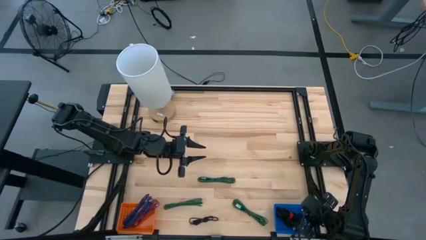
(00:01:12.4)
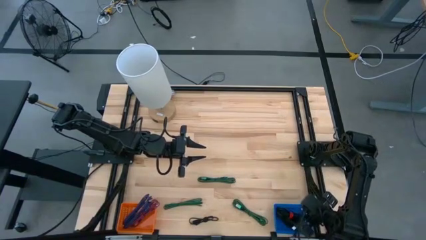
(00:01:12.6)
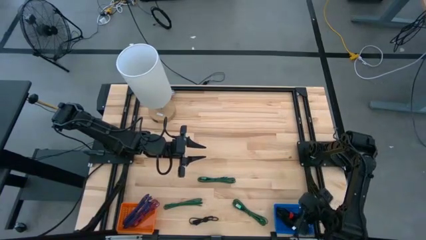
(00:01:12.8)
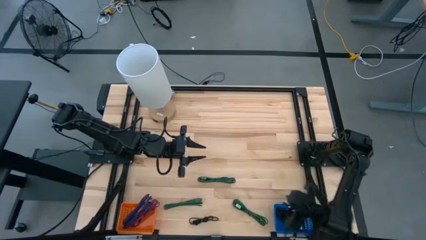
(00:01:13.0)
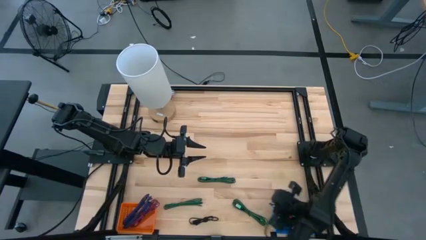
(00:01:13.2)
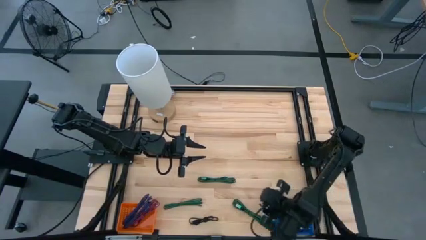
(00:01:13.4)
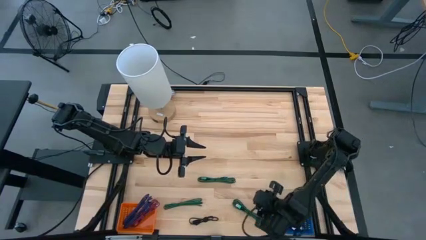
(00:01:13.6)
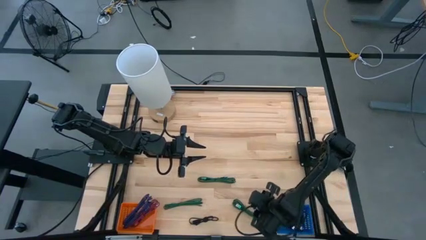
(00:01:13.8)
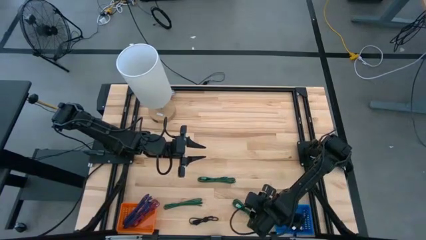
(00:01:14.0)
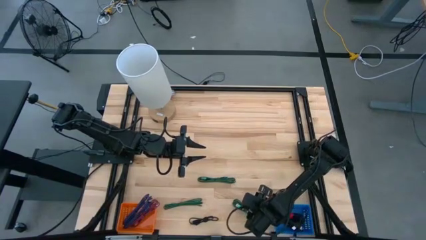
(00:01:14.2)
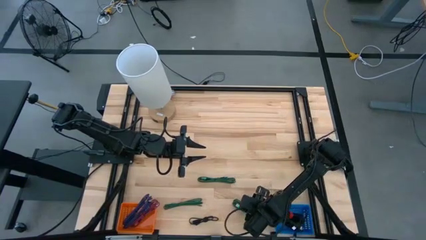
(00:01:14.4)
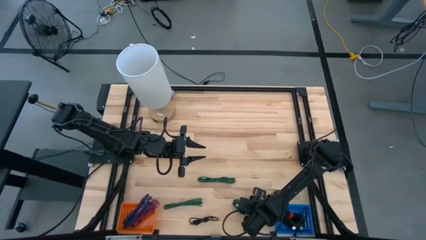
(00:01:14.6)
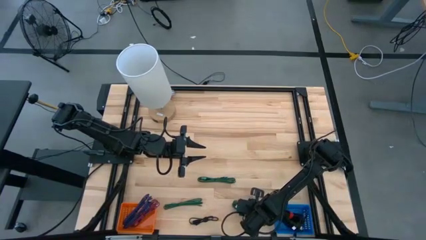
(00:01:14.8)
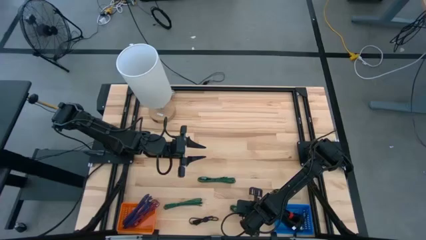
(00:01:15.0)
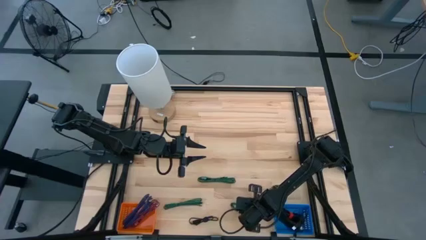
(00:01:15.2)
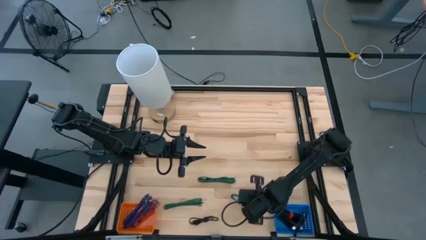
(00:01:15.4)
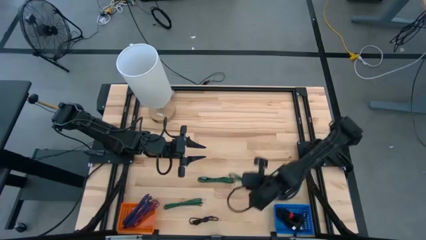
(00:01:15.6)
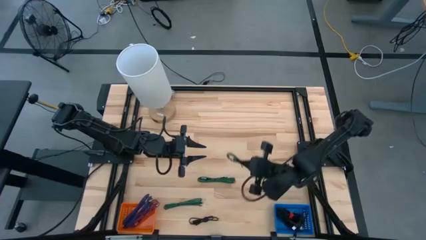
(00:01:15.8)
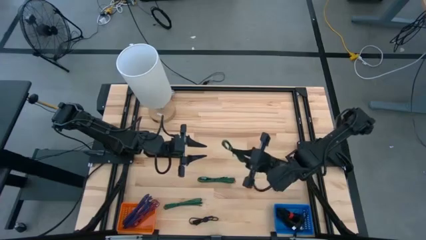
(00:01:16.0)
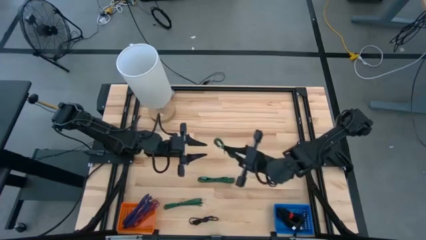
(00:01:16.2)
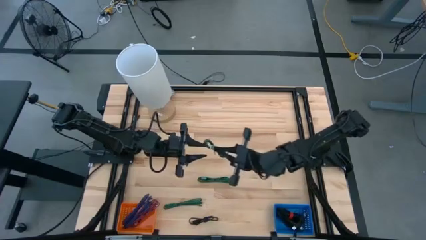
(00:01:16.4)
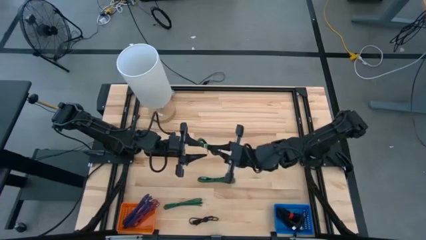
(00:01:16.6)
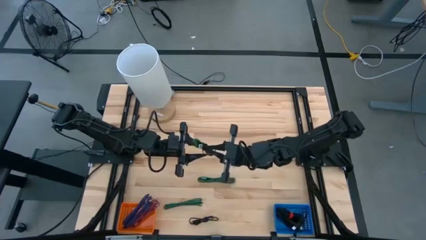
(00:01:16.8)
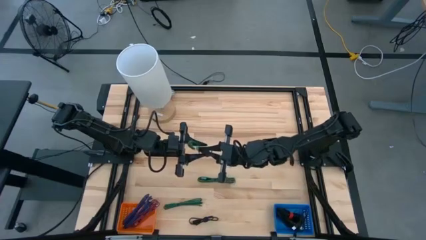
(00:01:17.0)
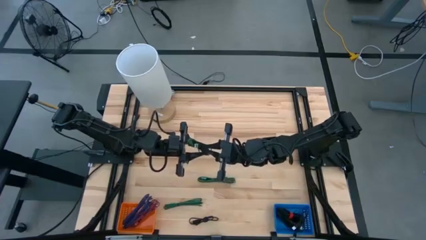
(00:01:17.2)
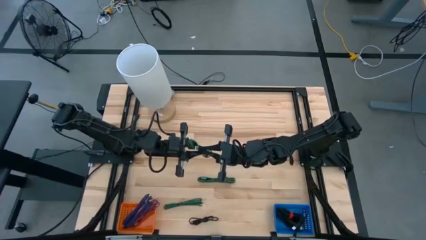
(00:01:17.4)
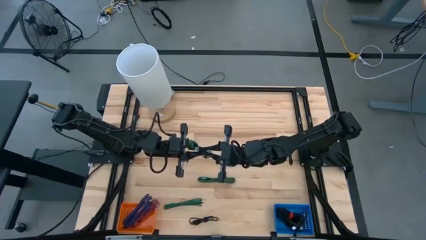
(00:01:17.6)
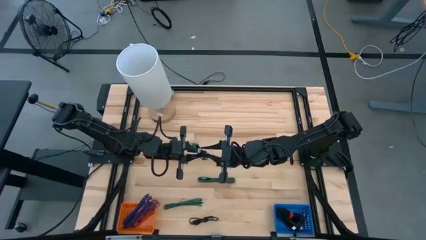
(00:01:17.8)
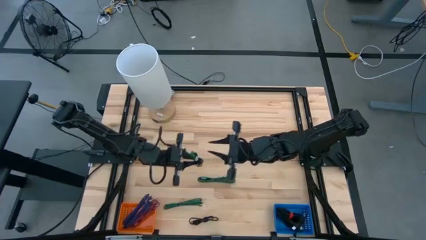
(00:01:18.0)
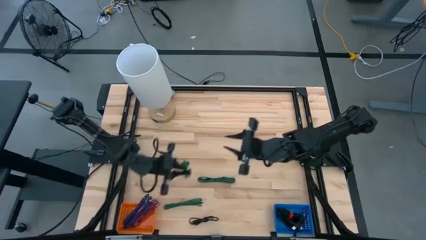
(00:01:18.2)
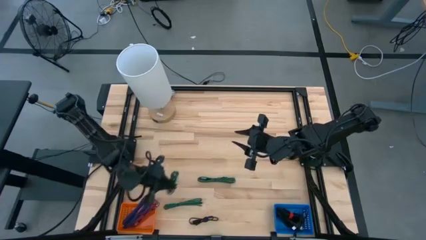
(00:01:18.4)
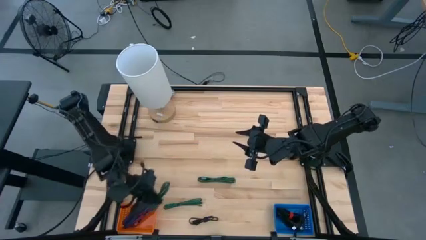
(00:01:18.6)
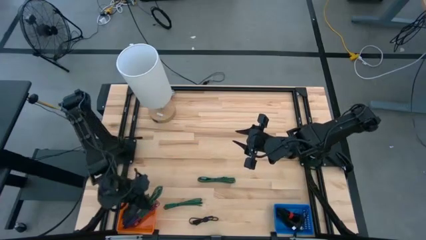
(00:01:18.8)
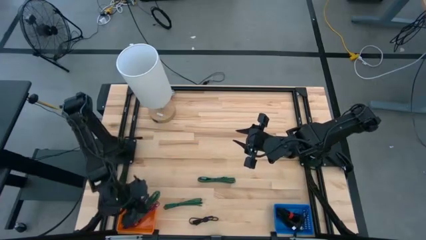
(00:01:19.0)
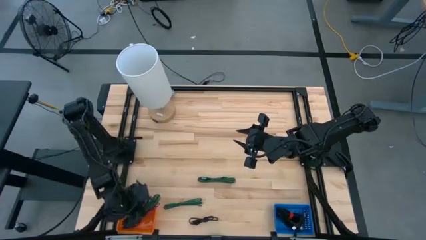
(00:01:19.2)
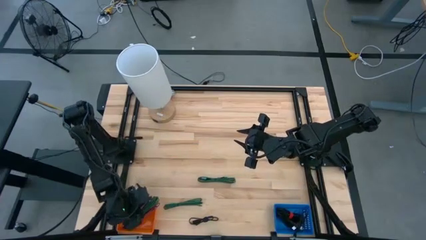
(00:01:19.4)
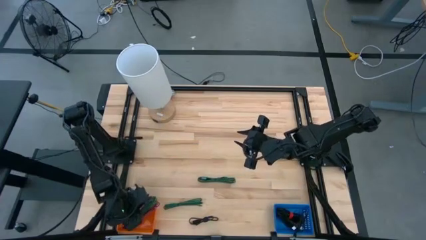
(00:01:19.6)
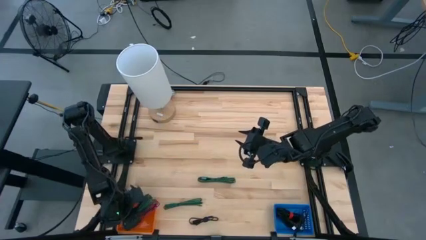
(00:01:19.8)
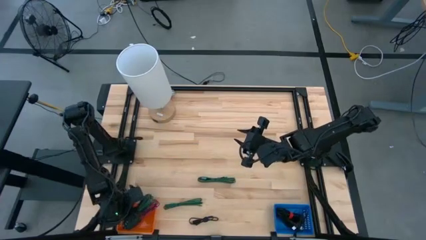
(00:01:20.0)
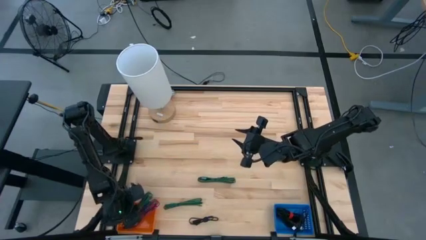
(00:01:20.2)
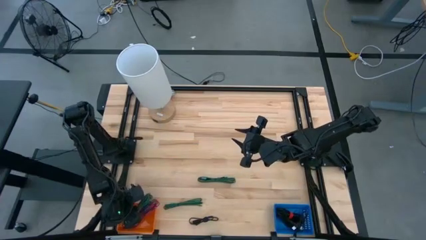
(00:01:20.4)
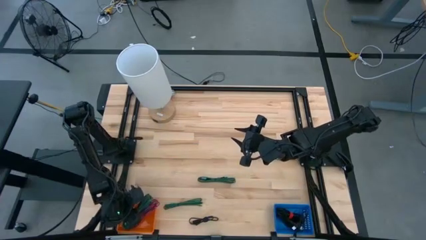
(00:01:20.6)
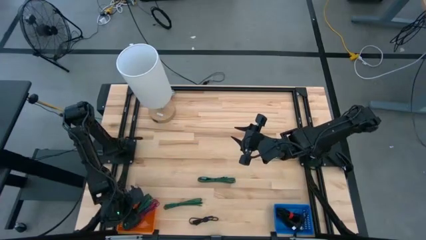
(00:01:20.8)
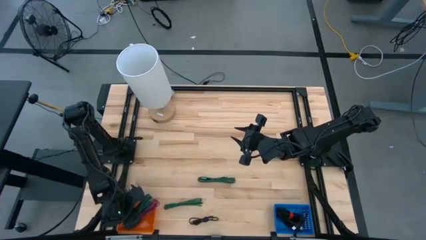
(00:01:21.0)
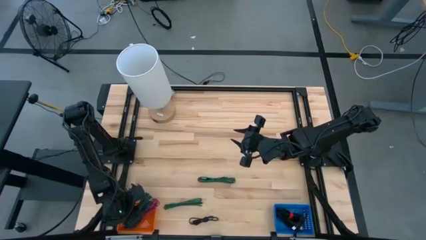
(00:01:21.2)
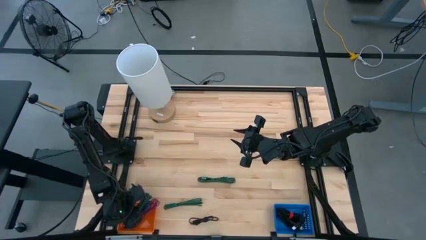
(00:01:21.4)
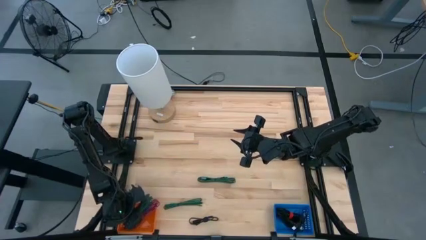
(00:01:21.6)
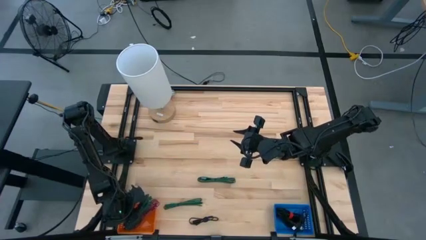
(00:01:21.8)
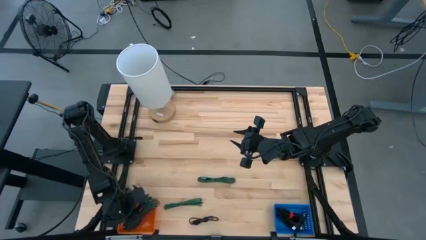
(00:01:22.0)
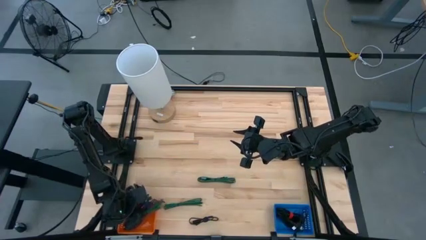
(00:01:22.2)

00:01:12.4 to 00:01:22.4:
Task: Pick & Place USB Port
Put the right green patterned charger cable into the orange bin

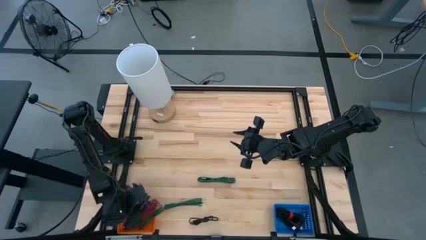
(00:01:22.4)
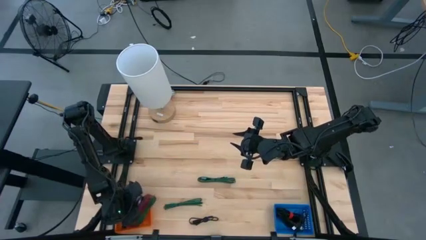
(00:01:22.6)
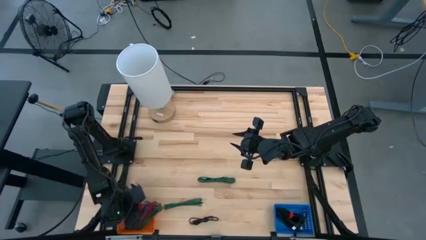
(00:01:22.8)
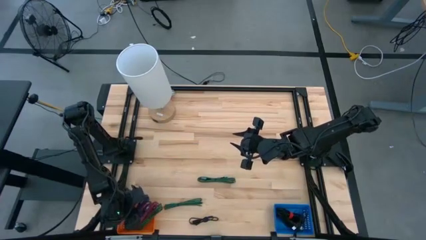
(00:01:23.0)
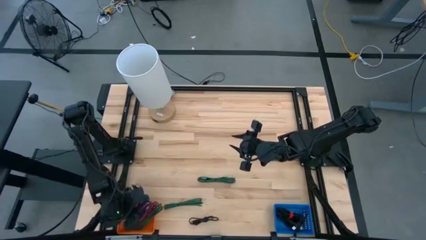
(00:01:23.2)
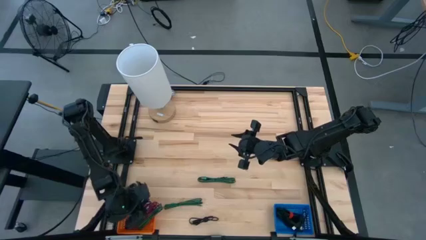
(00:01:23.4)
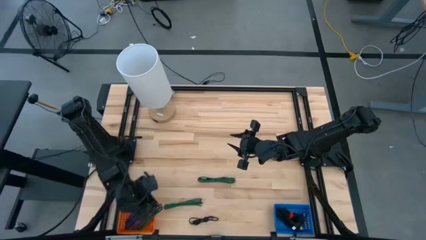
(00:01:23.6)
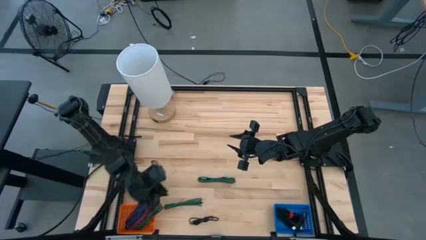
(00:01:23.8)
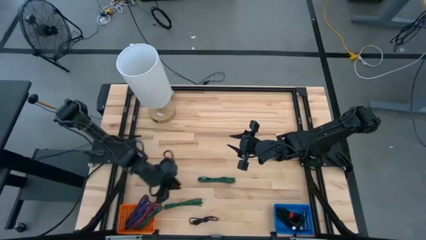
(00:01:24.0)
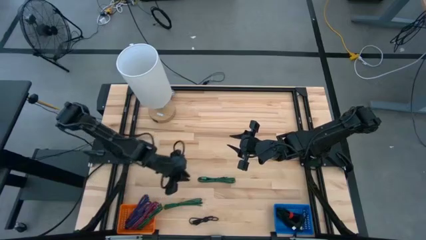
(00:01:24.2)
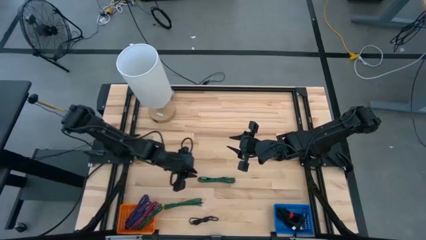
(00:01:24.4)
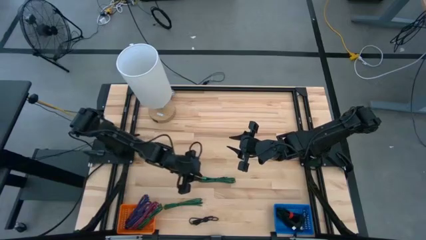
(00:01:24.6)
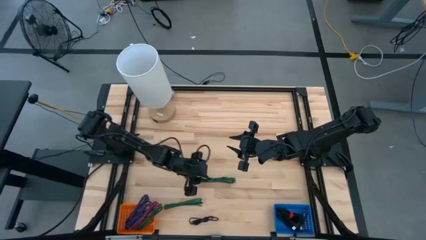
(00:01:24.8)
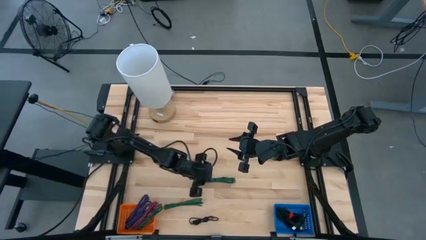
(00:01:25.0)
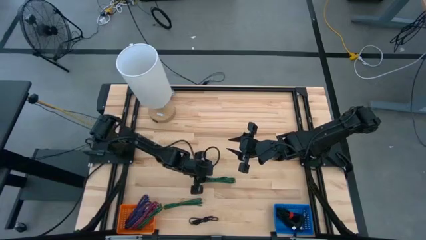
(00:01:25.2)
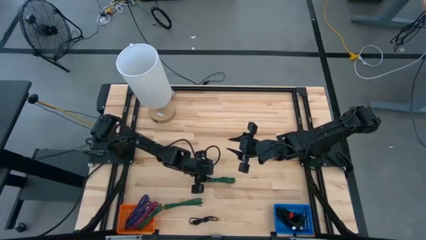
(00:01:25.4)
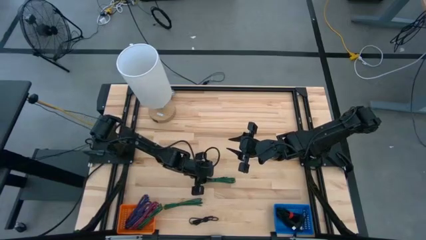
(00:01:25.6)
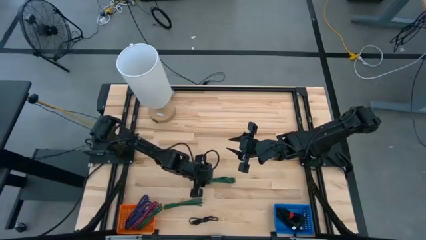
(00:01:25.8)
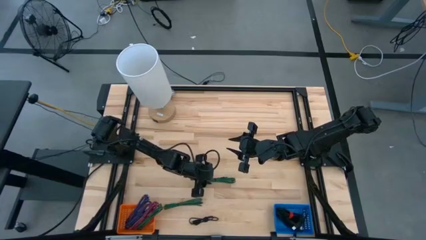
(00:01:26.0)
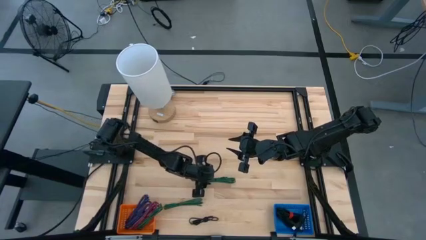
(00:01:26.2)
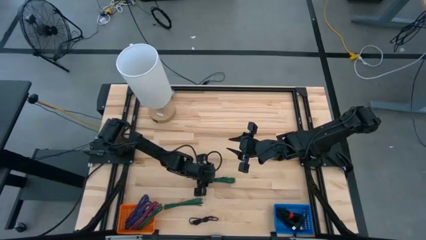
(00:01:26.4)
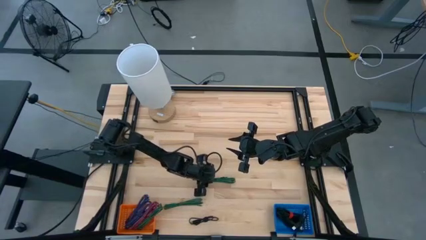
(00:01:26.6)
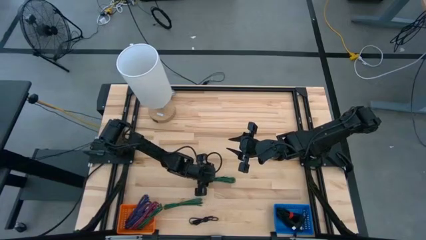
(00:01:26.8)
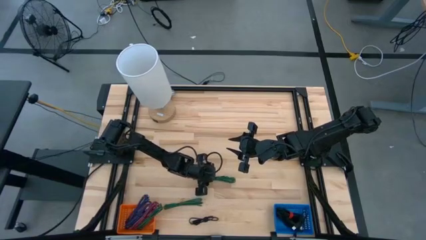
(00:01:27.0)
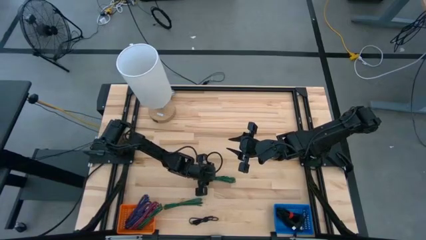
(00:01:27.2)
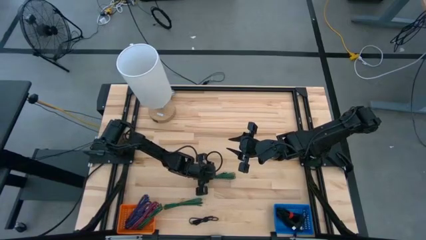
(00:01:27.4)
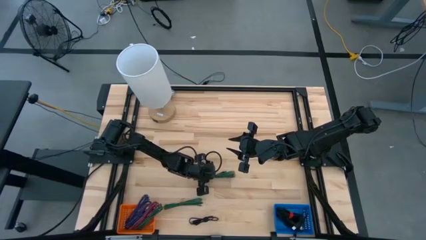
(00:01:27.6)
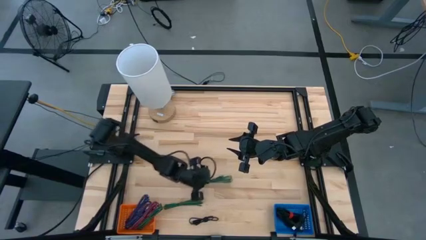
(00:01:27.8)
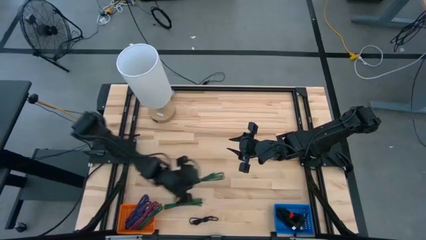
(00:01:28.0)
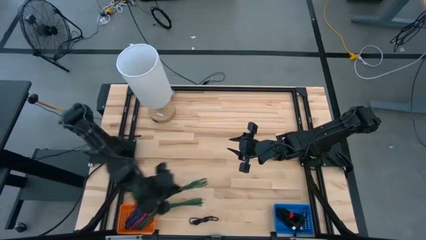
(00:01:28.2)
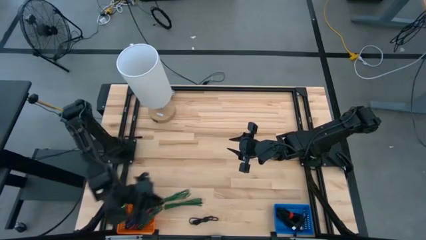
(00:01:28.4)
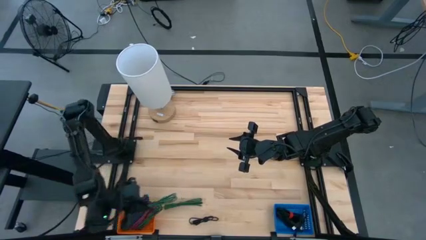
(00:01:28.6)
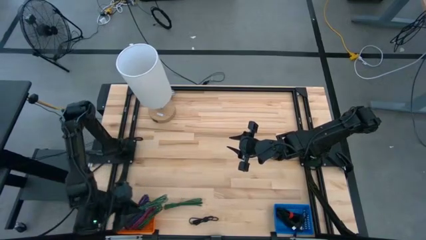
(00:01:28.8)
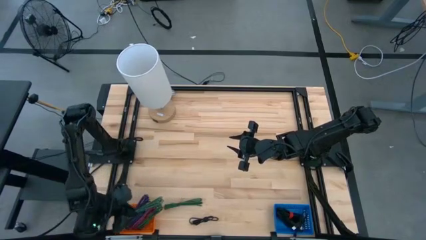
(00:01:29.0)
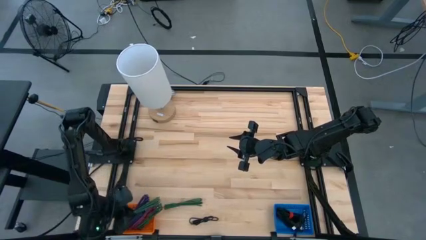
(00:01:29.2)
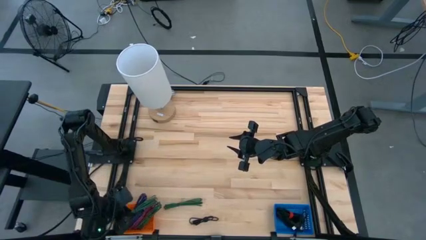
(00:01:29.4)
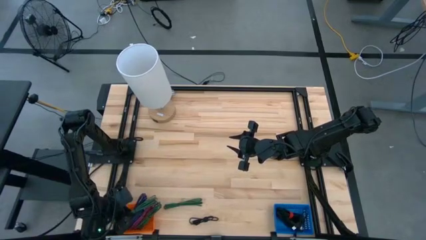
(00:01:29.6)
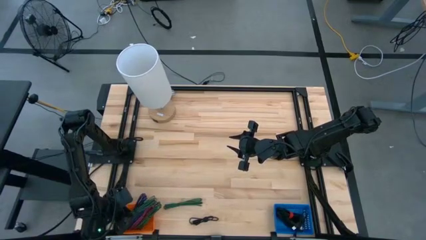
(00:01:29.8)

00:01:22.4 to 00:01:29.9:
Put the green patterned charger cable into the orange bin
